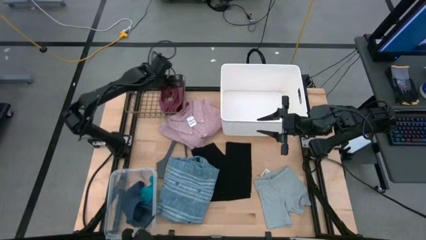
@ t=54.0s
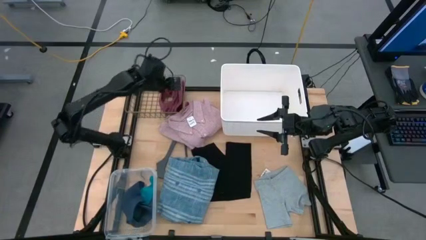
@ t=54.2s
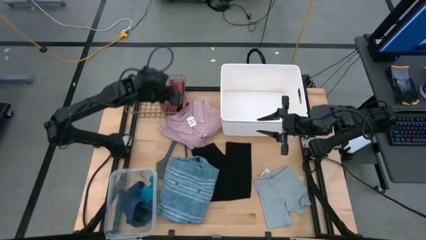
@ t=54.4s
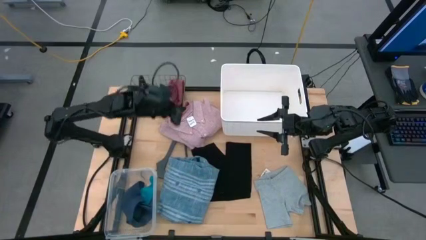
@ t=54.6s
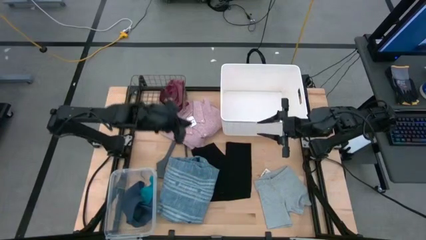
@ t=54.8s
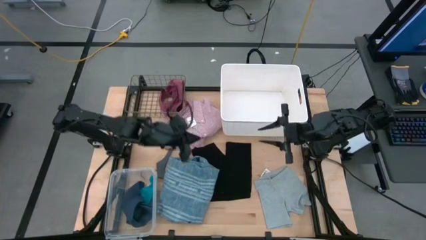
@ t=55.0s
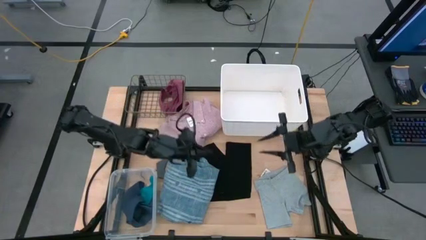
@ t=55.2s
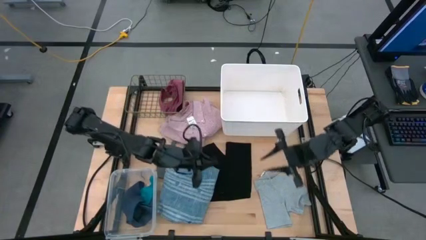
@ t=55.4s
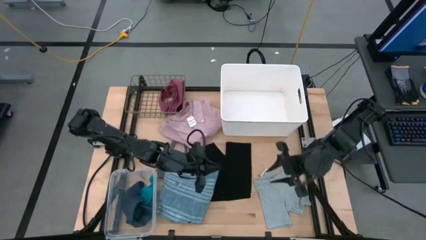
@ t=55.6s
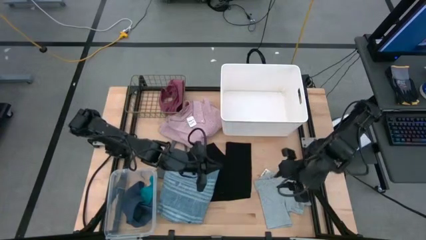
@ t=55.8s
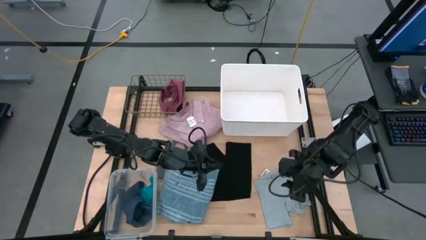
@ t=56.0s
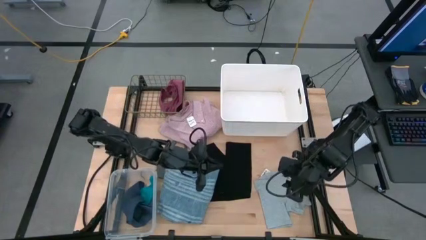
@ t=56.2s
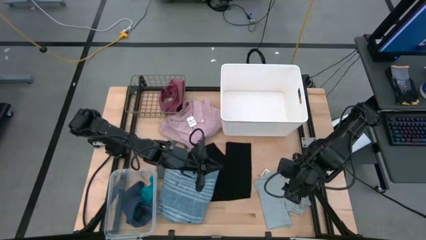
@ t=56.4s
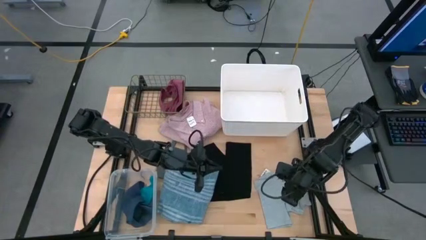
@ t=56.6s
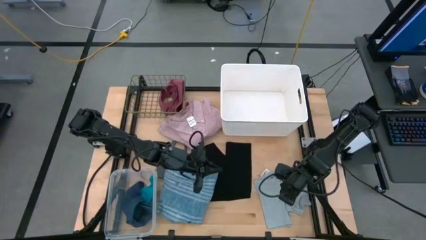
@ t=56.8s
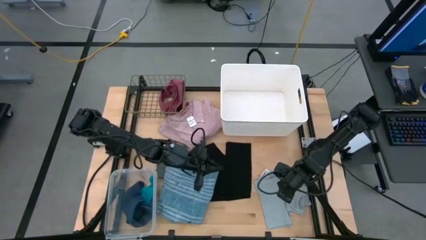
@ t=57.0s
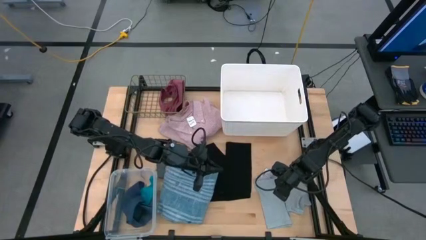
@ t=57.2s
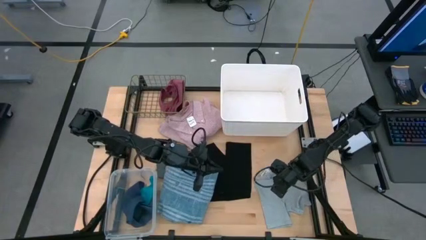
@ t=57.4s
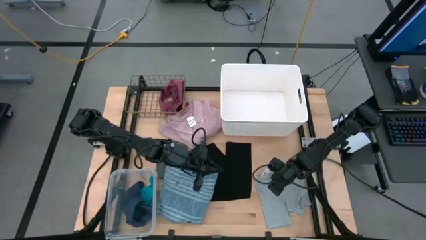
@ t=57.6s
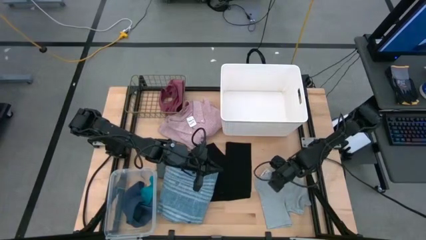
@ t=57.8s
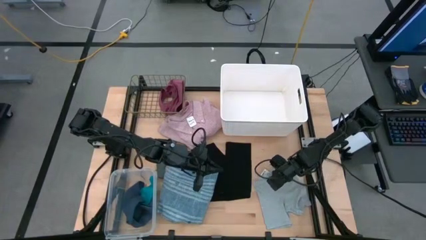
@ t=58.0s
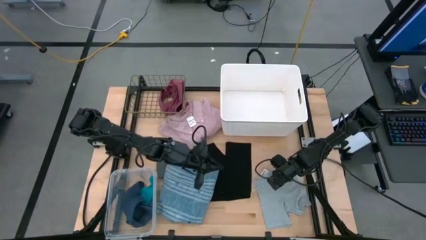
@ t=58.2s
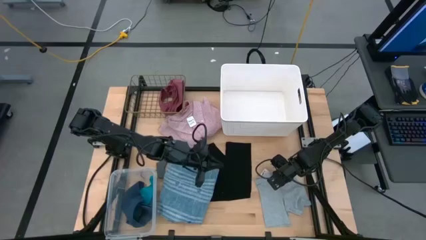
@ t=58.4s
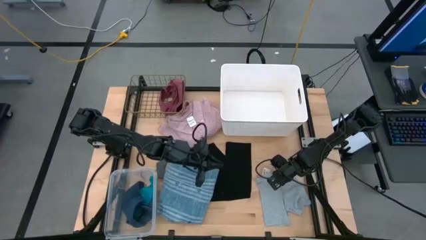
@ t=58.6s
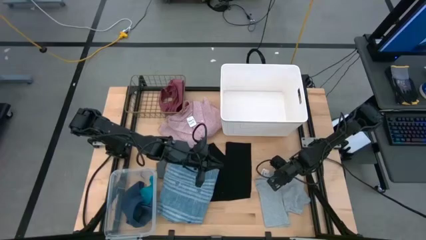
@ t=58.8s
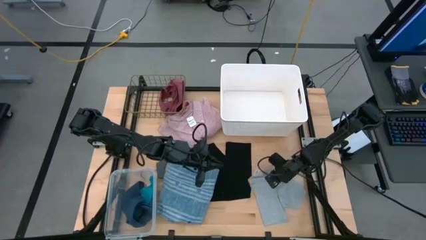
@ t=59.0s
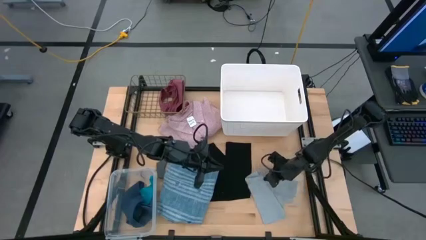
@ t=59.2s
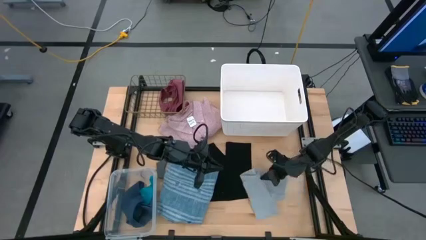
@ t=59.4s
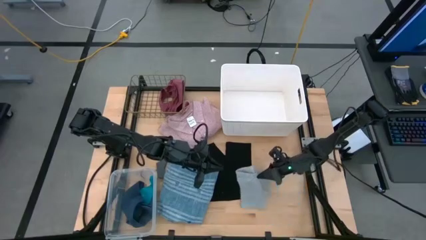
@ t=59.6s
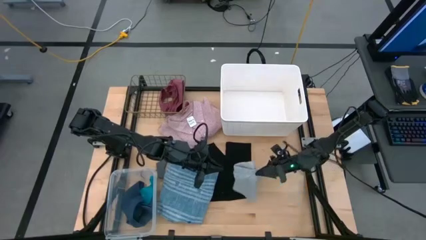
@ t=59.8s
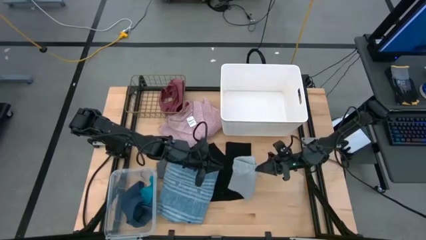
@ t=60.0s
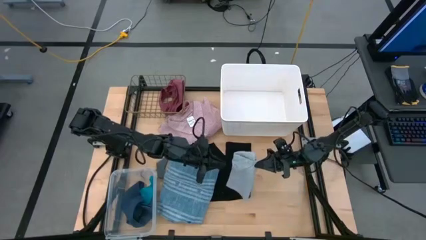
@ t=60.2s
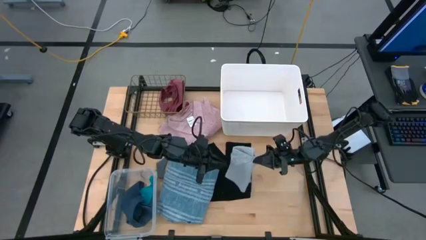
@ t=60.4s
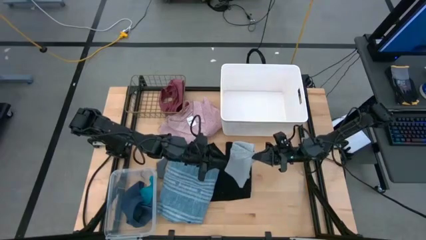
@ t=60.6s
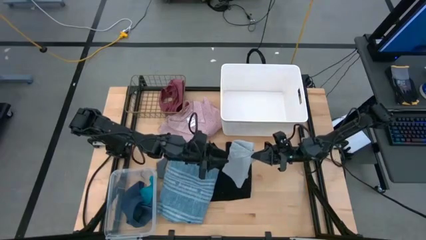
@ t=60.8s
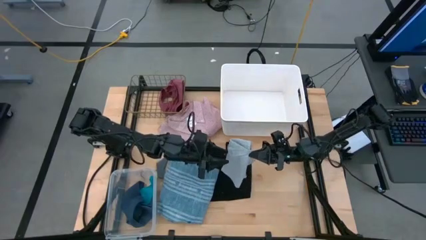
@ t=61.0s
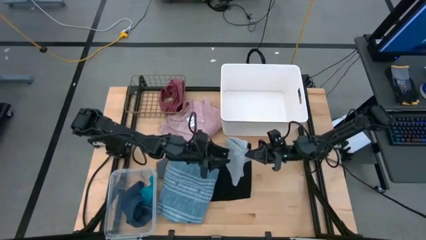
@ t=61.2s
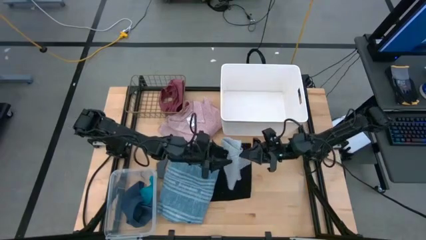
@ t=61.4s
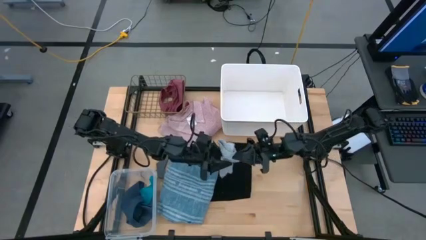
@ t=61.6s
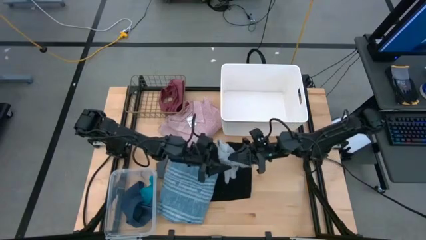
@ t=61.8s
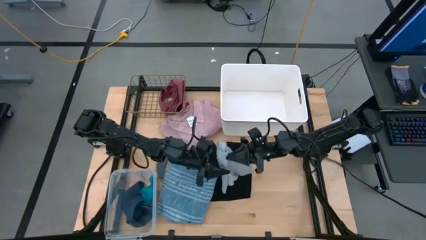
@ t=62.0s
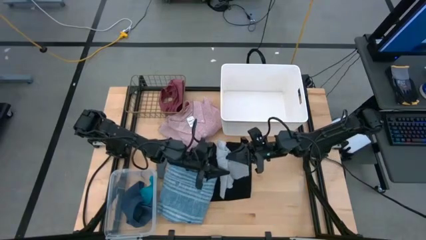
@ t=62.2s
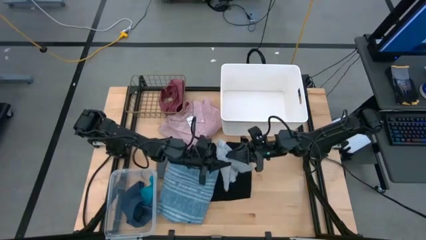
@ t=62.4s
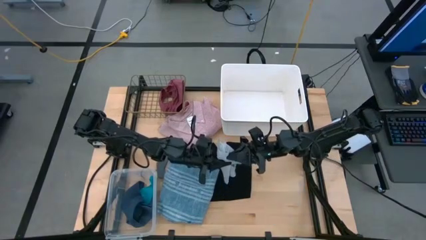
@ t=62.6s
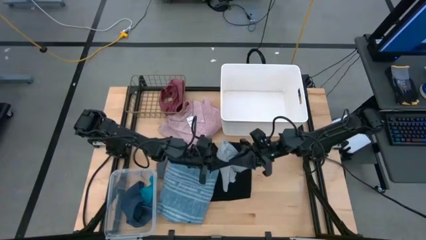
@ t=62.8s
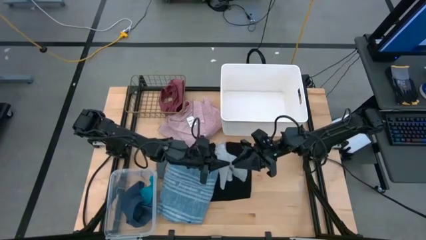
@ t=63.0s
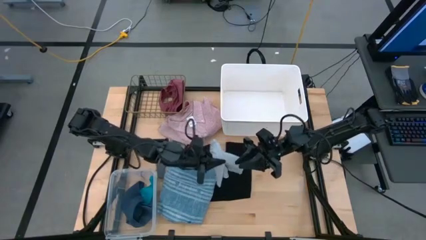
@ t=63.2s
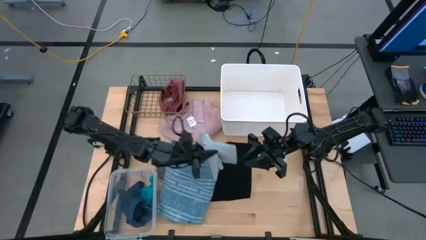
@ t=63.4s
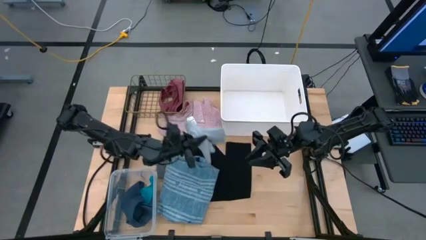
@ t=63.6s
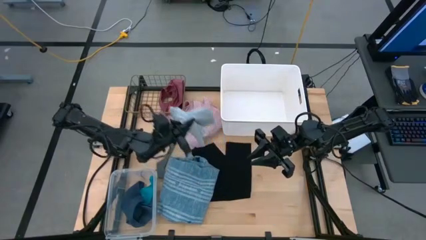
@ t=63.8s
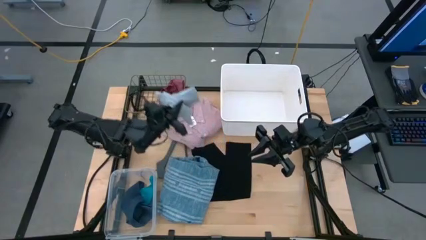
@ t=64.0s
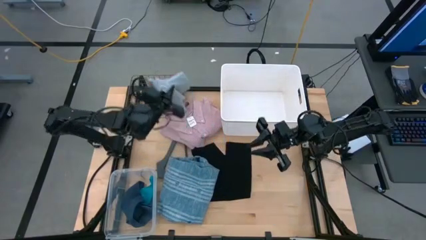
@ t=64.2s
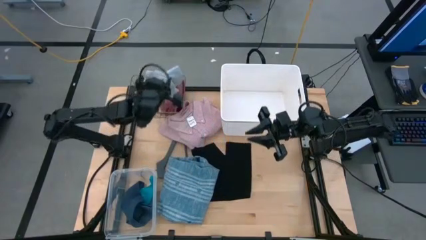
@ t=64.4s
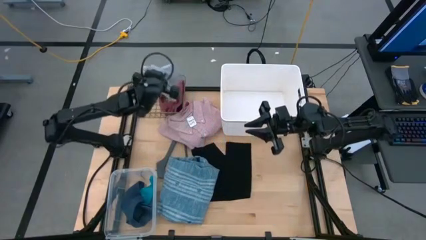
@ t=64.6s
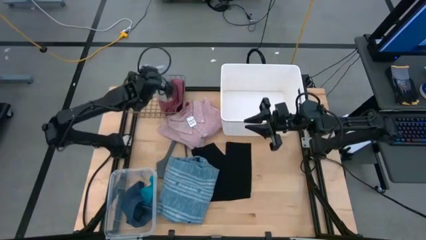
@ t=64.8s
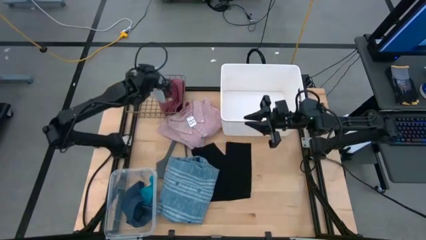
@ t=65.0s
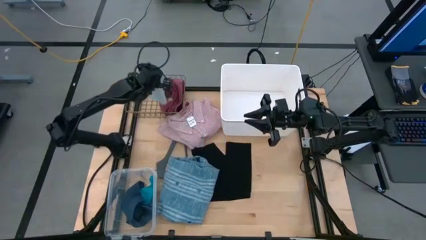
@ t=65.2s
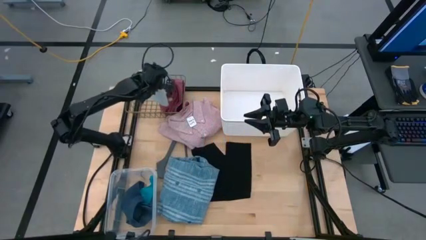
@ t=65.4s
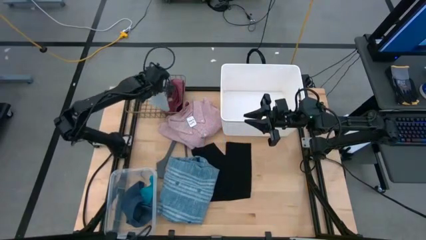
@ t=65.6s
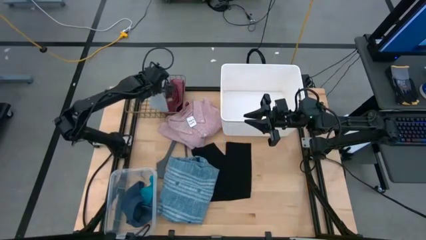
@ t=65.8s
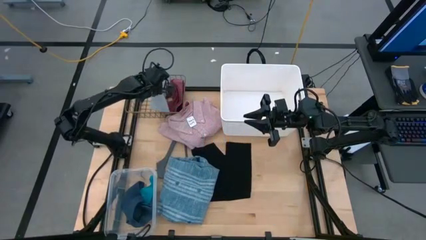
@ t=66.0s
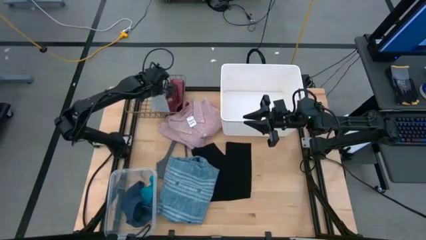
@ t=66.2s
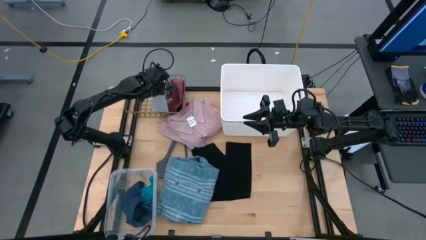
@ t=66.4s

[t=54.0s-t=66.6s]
Task: Pick & Place Cloths
Put the gray underwear into the gold wire basket
